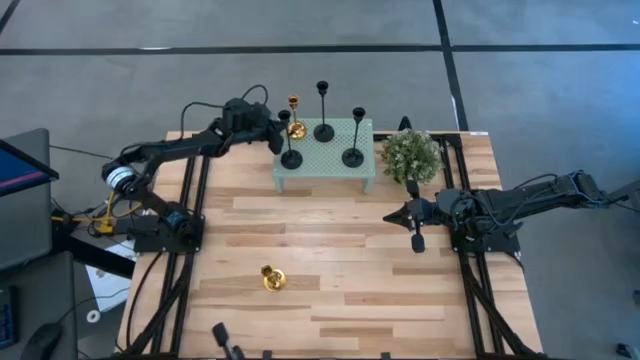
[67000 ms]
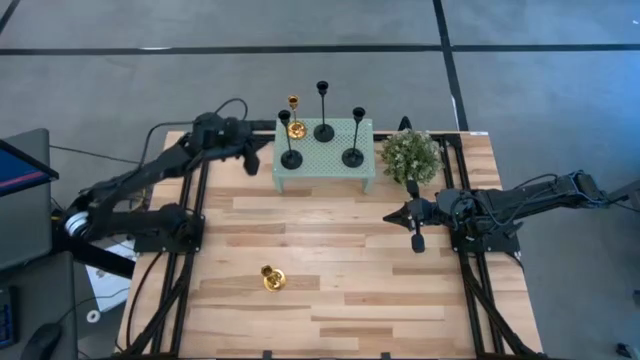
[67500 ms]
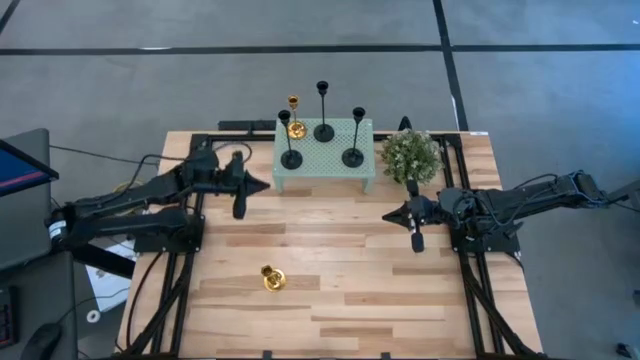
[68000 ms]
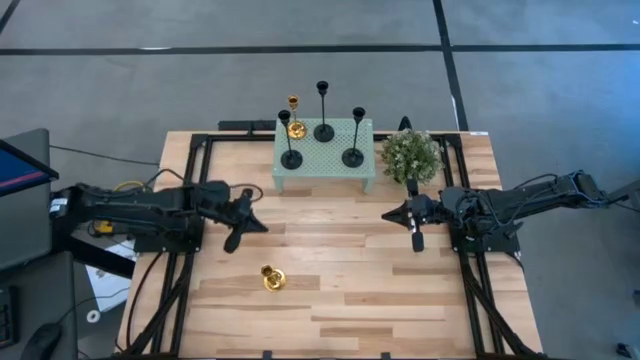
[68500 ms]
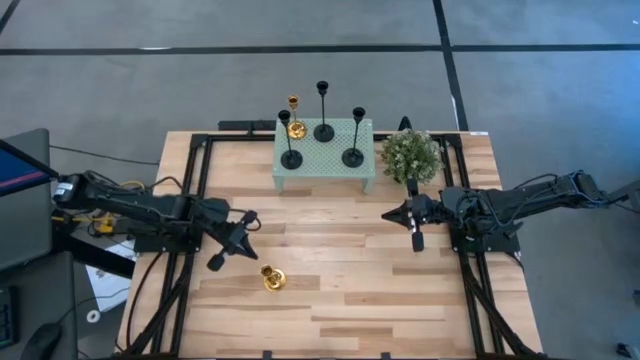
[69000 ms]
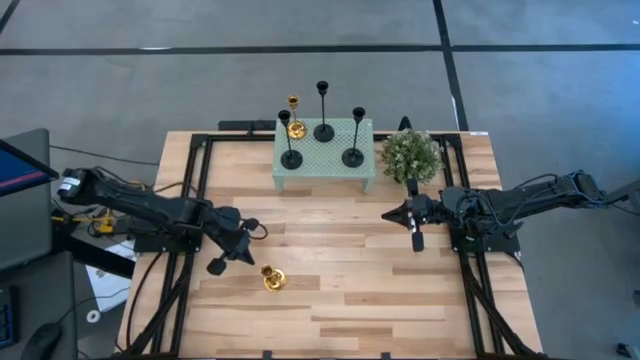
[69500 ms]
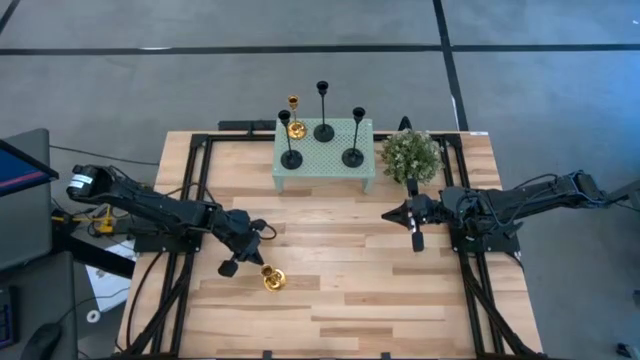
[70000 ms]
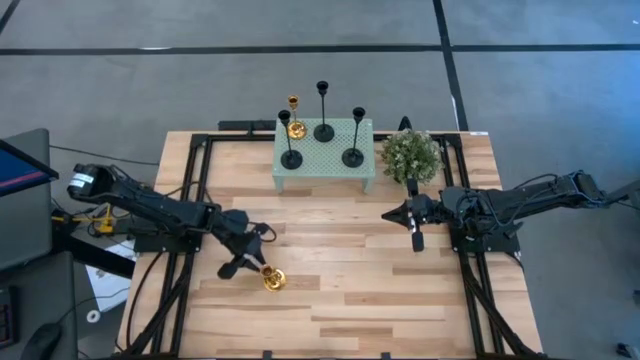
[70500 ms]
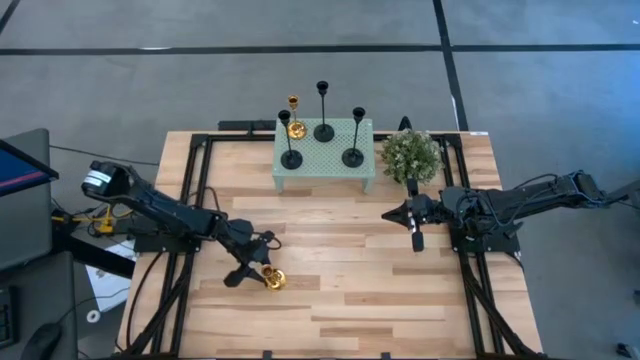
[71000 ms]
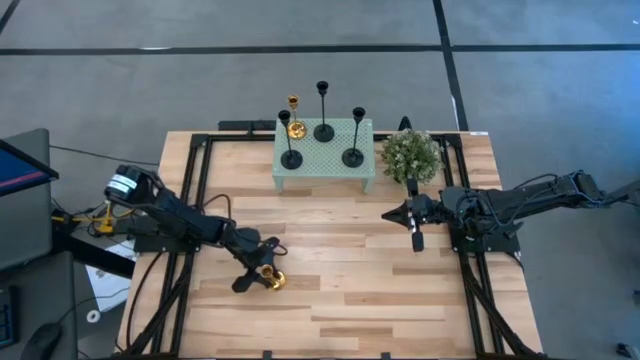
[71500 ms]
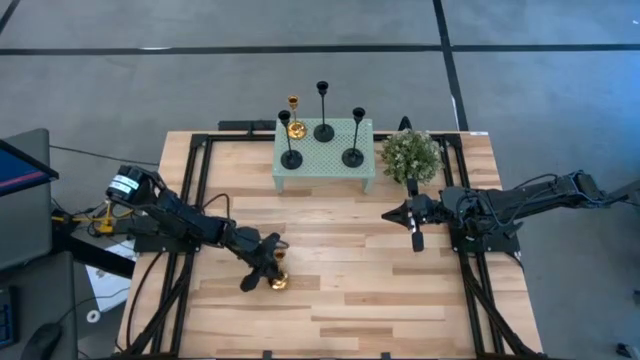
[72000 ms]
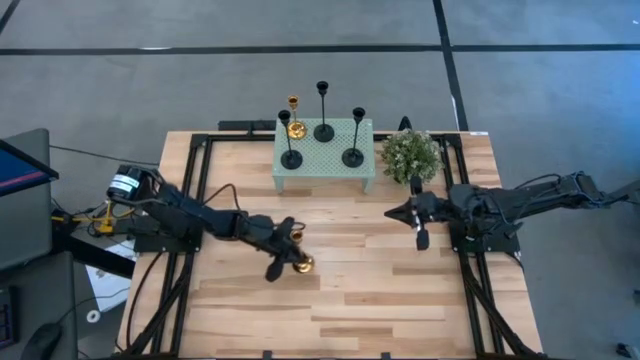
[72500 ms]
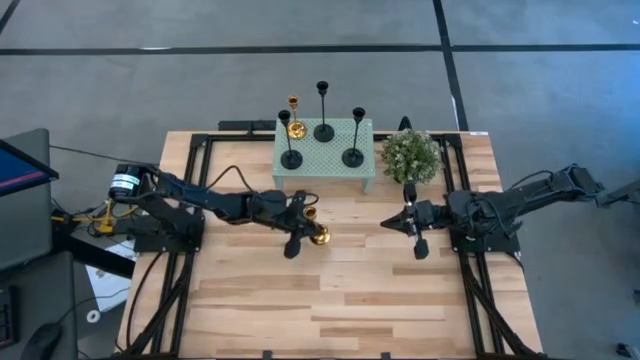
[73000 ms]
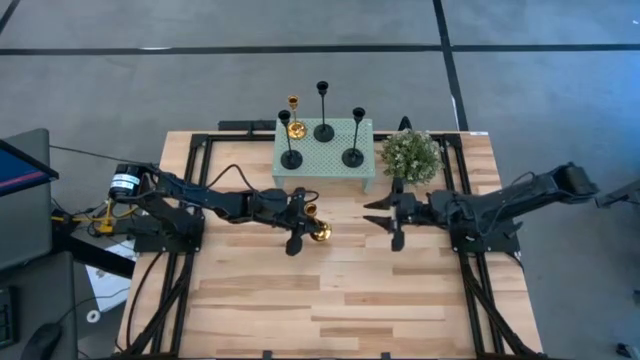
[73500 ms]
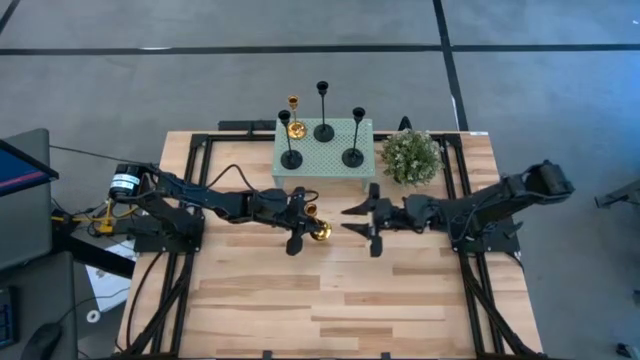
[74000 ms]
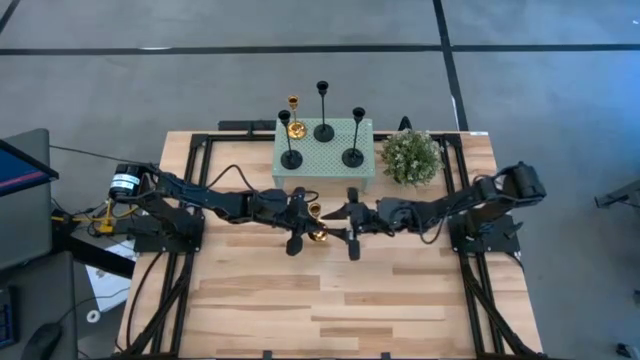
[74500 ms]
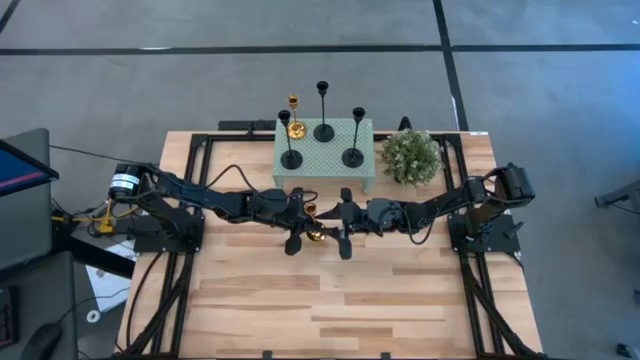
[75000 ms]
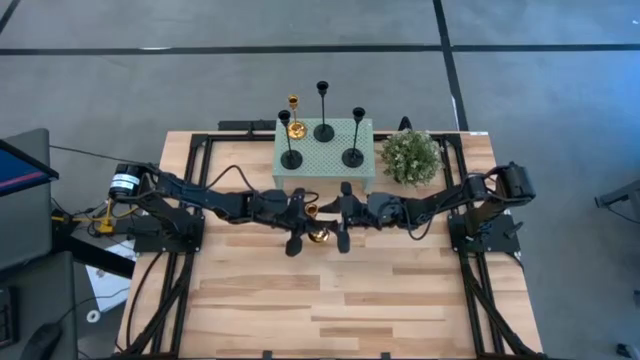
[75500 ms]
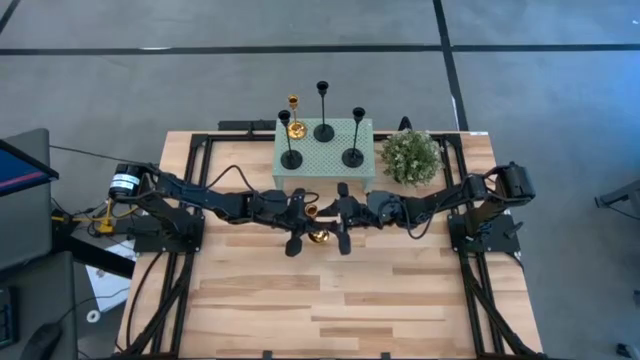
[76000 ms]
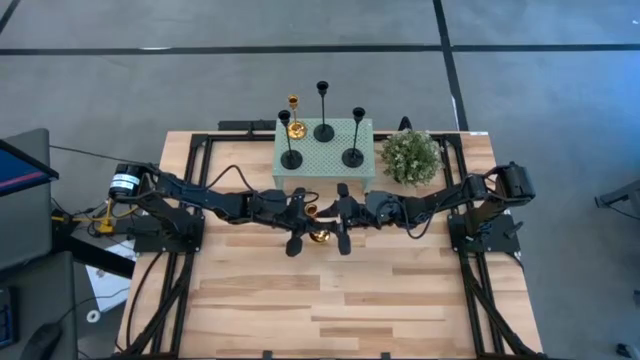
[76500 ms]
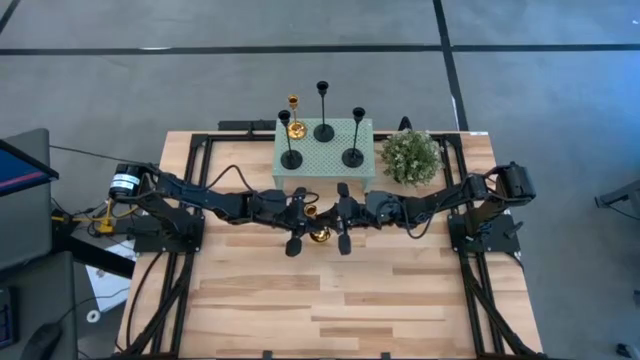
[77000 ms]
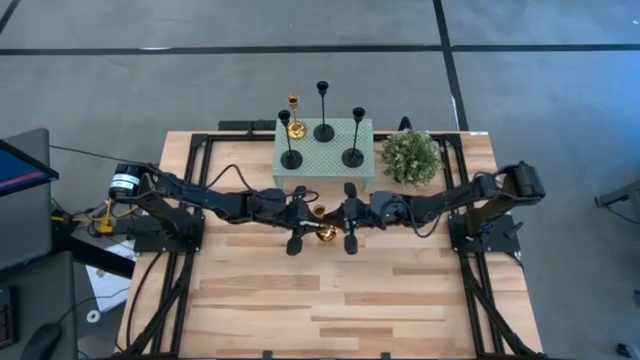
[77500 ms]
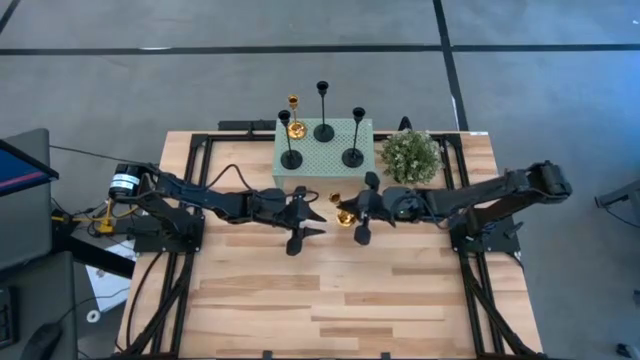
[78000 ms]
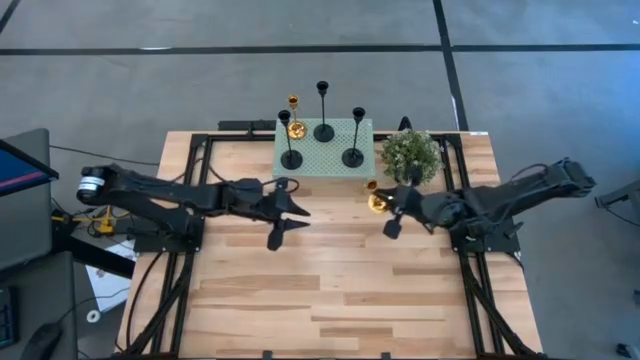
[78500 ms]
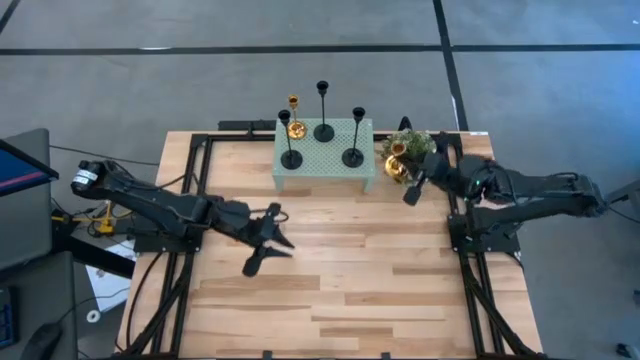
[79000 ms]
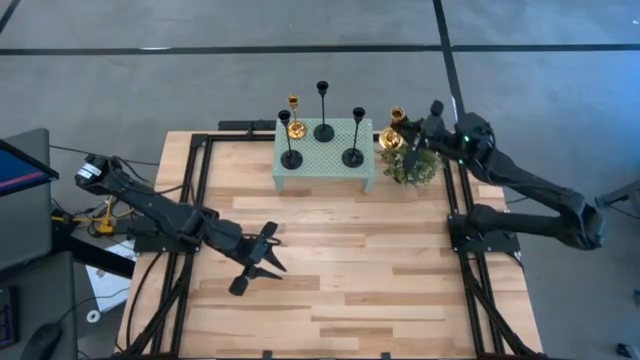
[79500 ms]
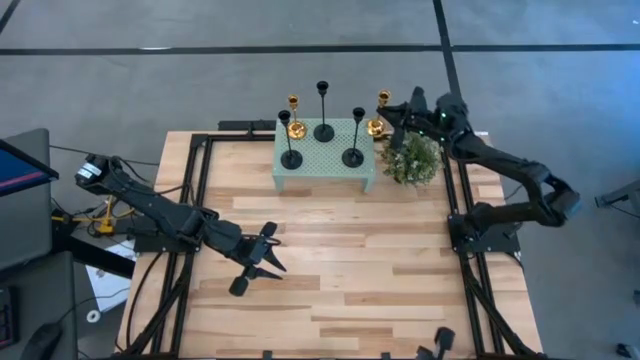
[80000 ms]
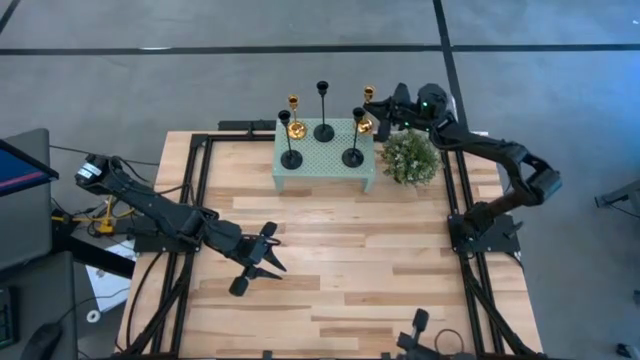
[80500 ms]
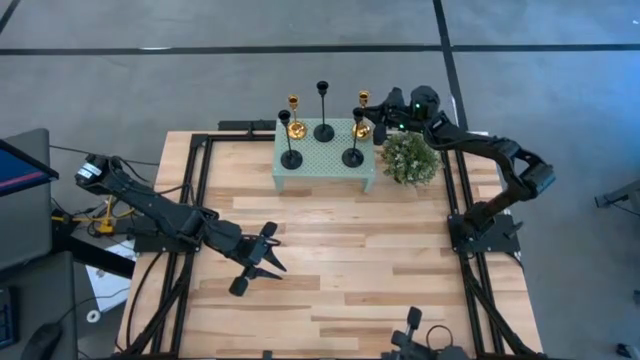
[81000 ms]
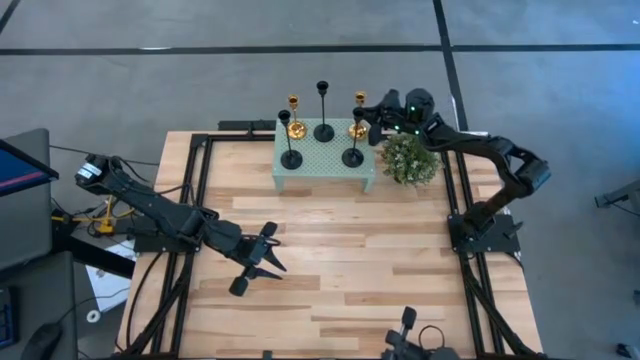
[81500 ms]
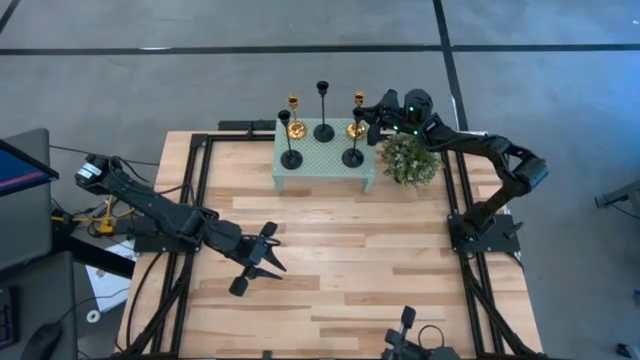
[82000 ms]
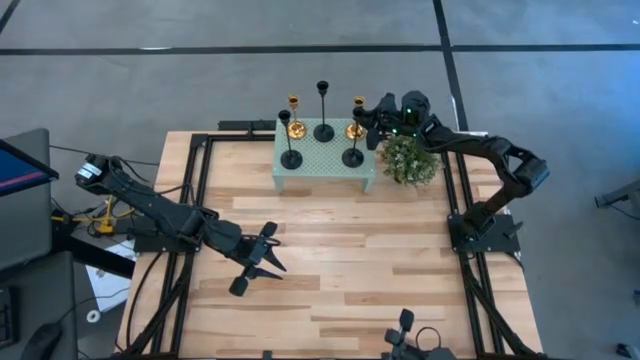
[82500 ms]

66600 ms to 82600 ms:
Task: Pick & Place candle stick holders
Put the gold candle holder on the shelf

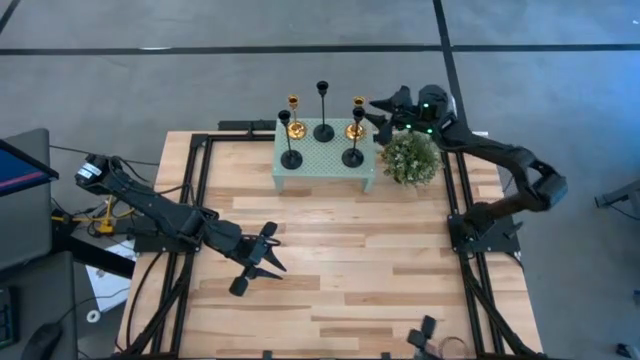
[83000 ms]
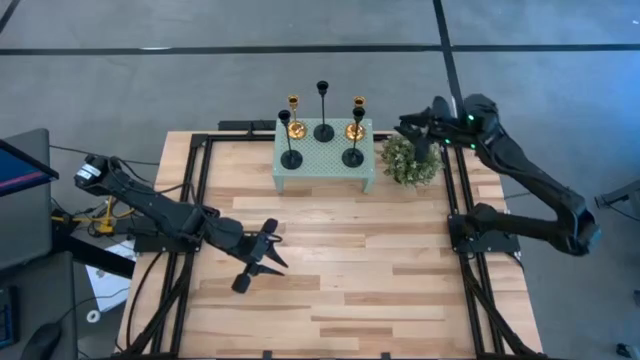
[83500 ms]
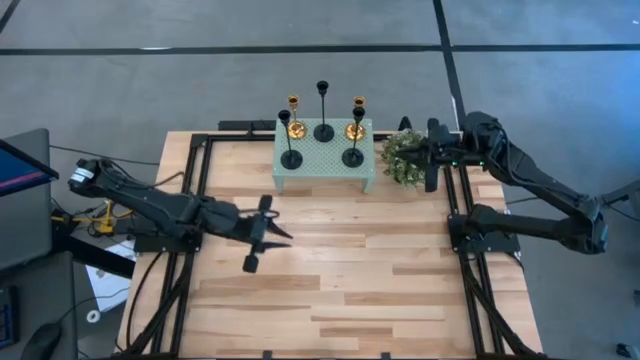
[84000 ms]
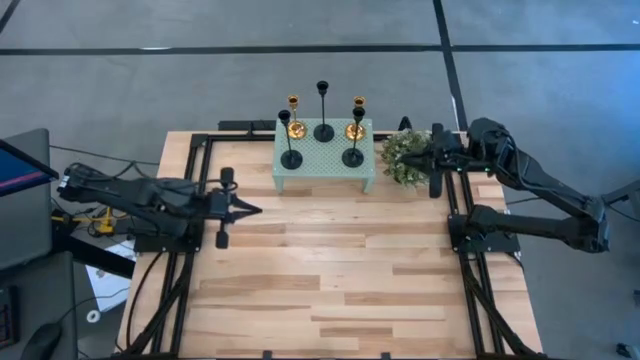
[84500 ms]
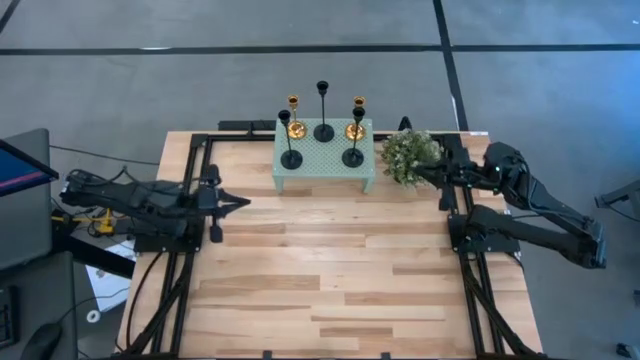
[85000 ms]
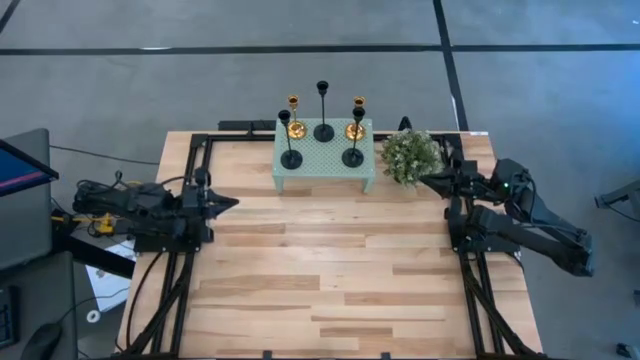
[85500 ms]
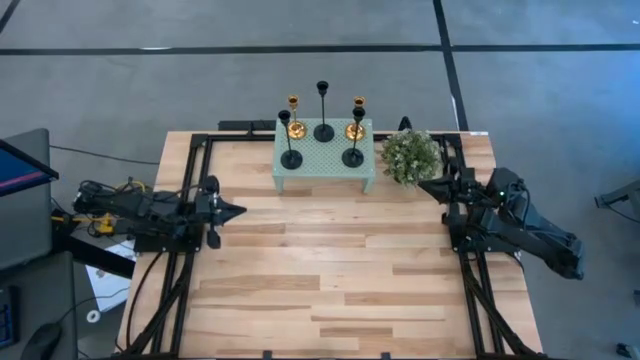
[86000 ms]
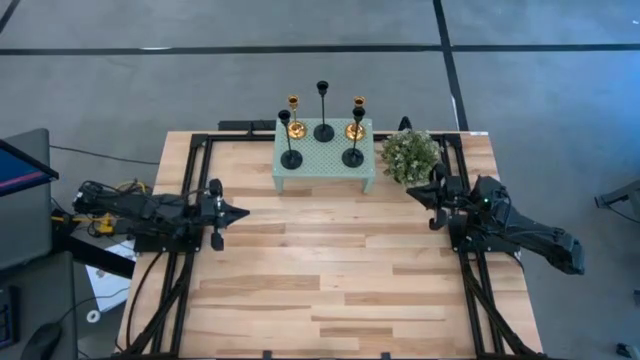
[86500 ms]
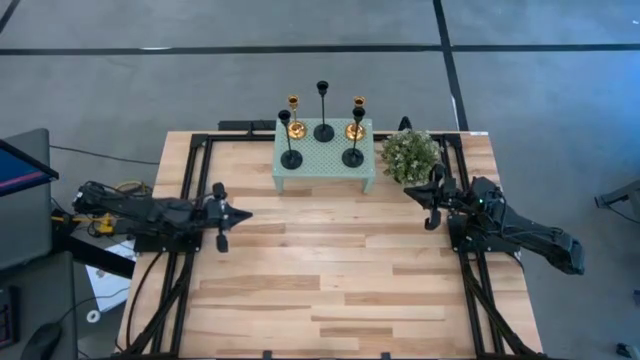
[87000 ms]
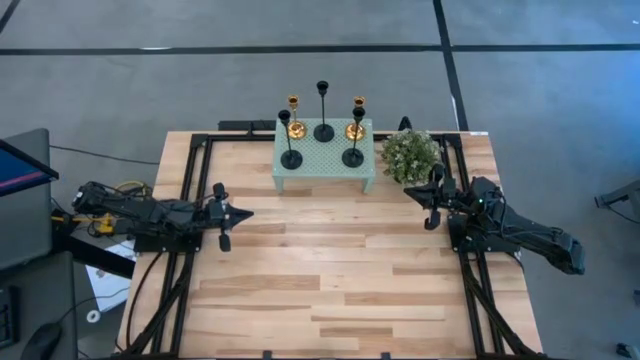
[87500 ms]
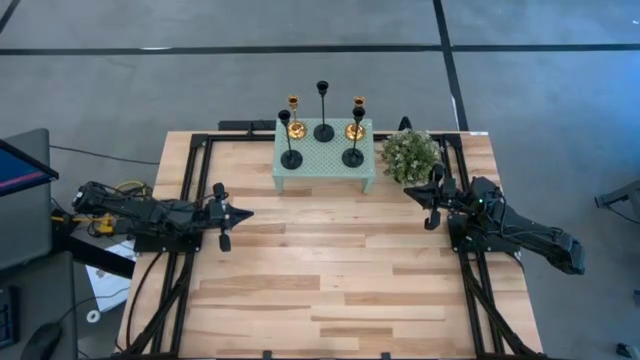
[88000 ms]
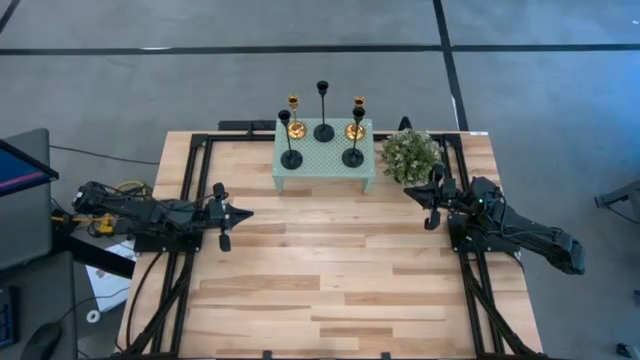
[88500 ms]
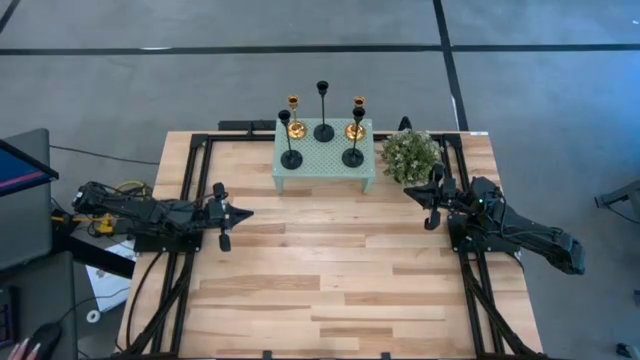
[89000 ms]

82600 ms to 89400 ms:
Return to Home Position
